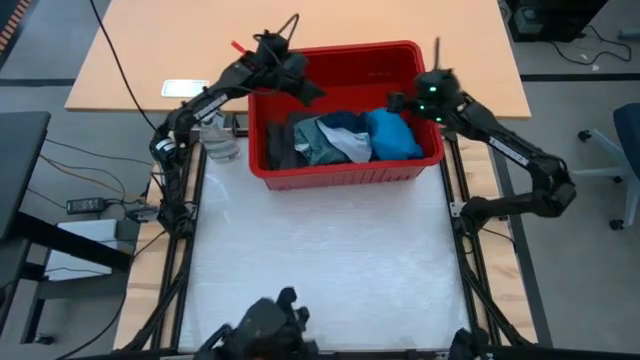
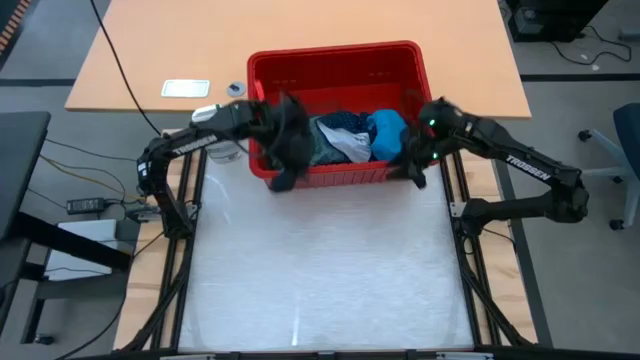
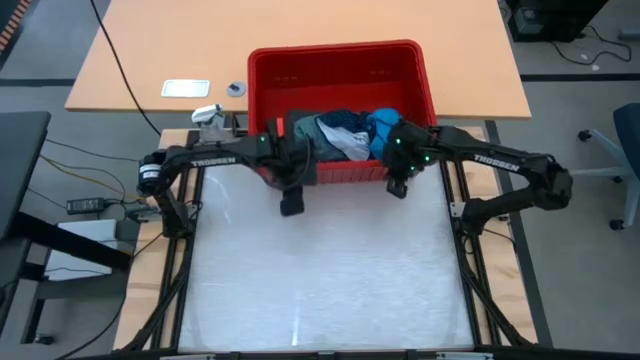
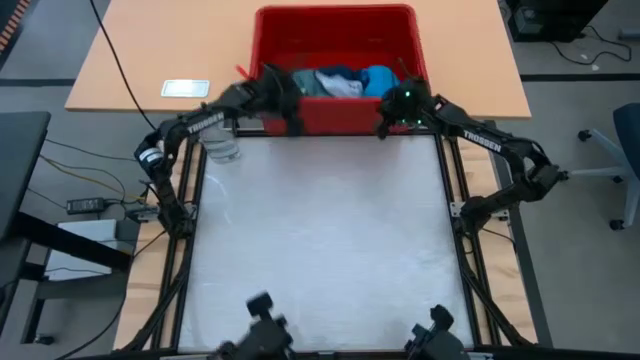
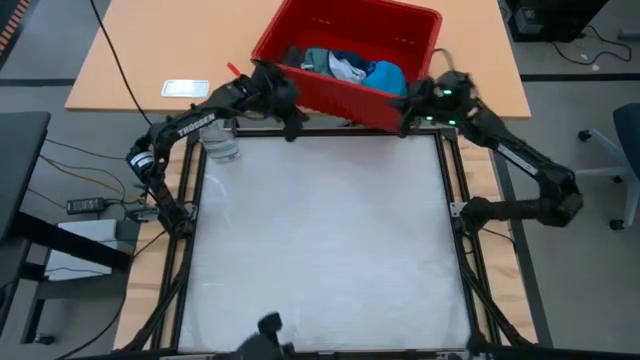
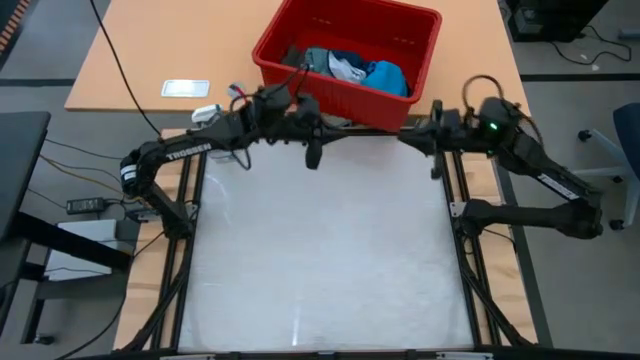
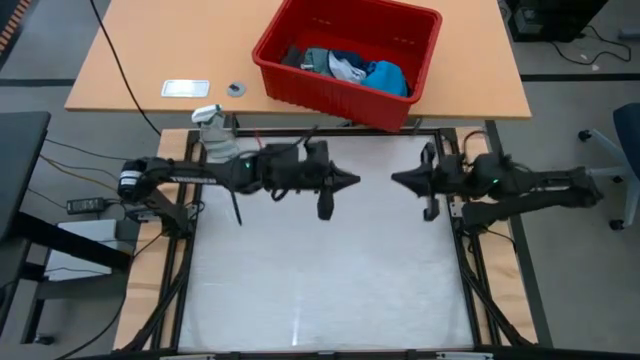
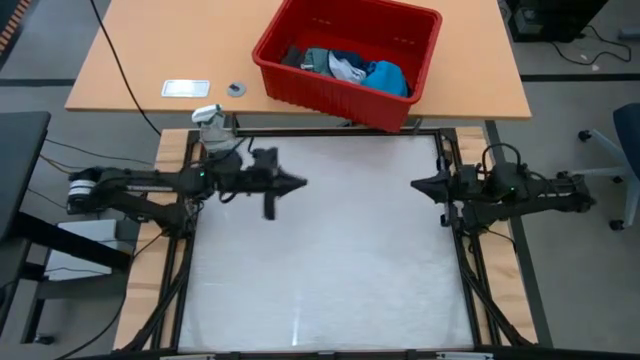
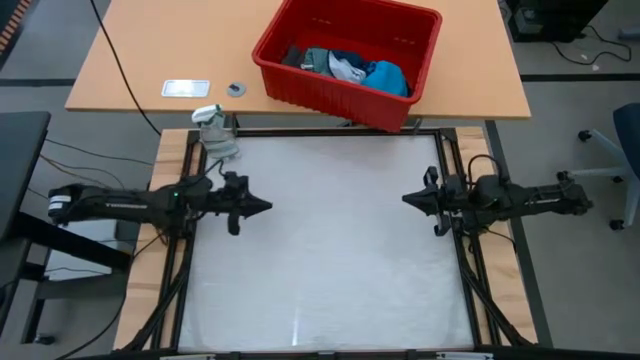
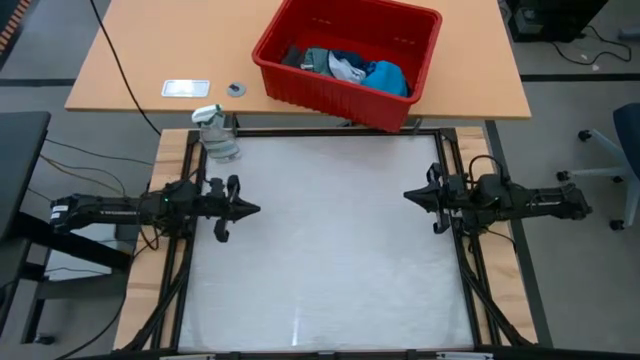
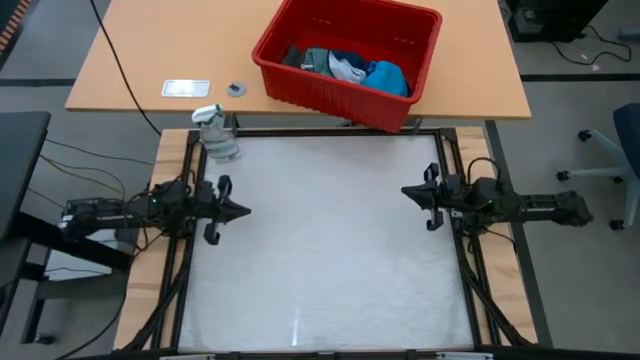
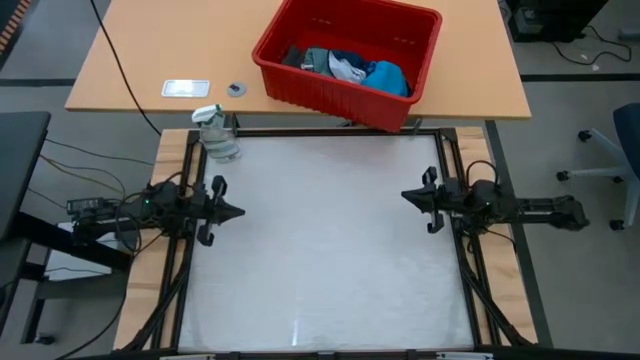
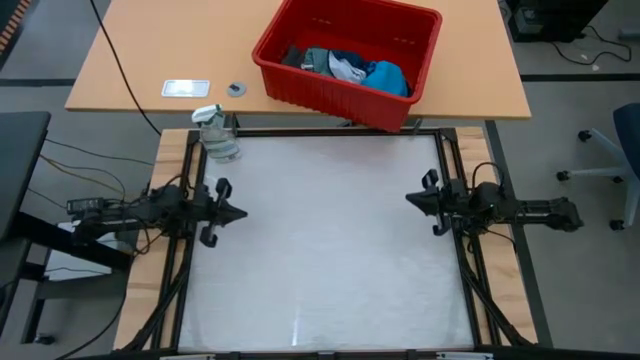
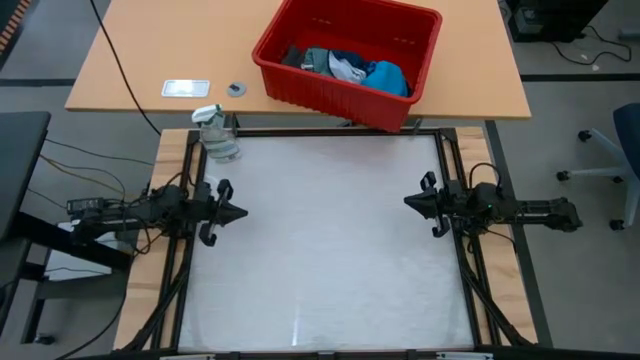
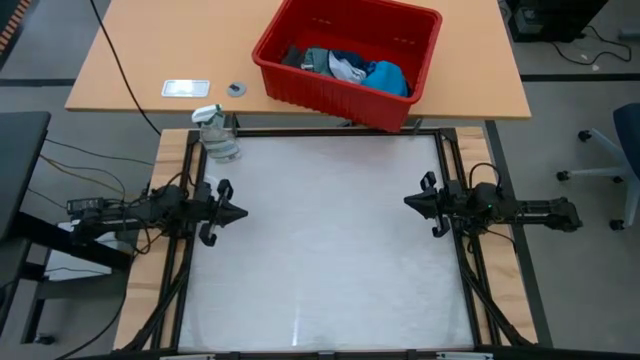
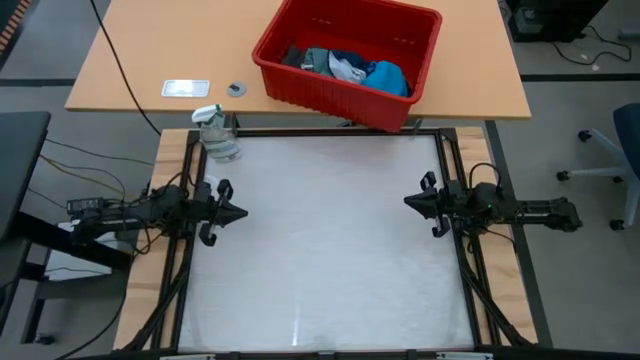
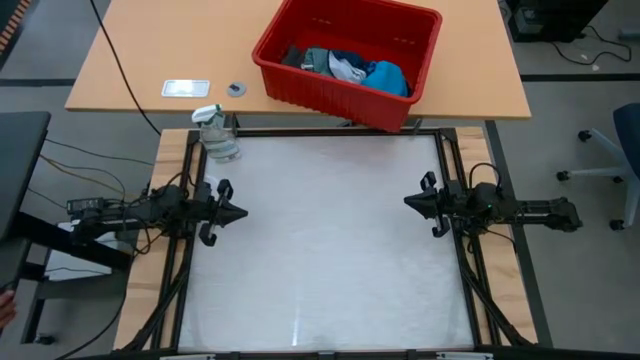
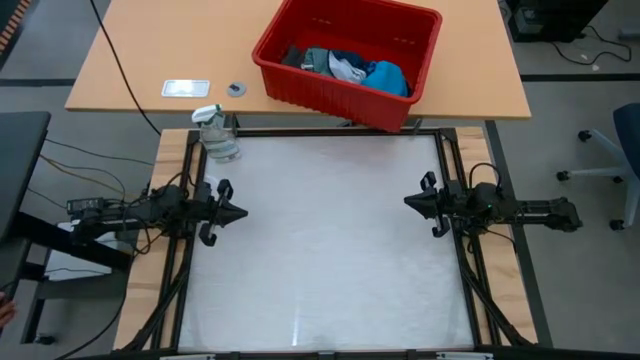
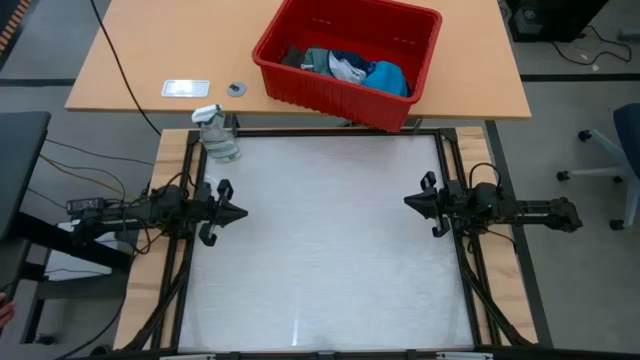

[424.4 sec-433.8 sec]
Task: Fold Laundry from Bin
Return to Home Position

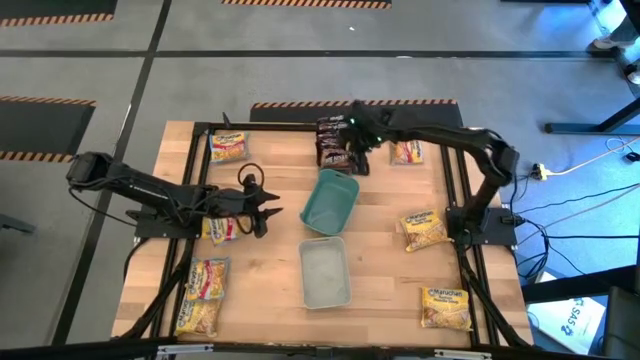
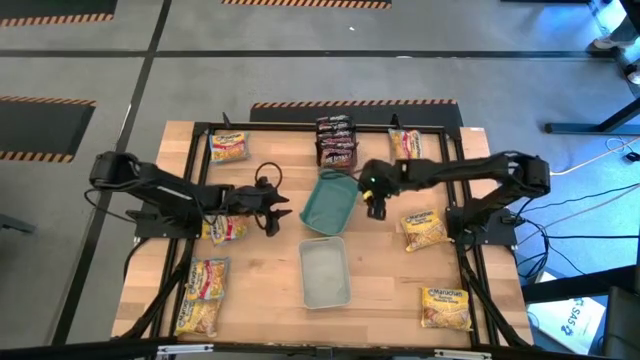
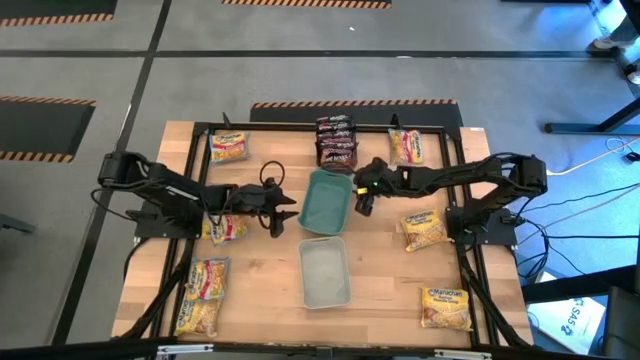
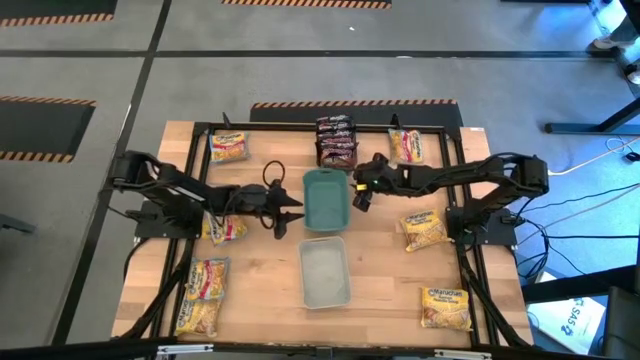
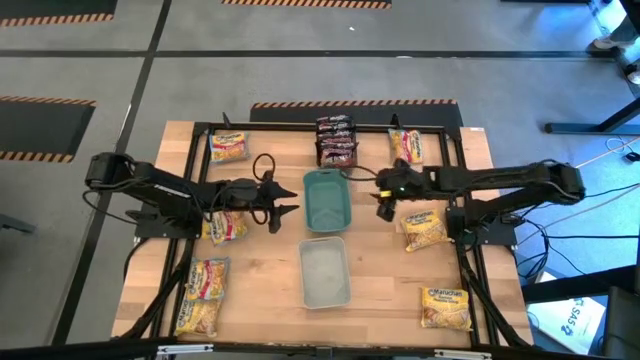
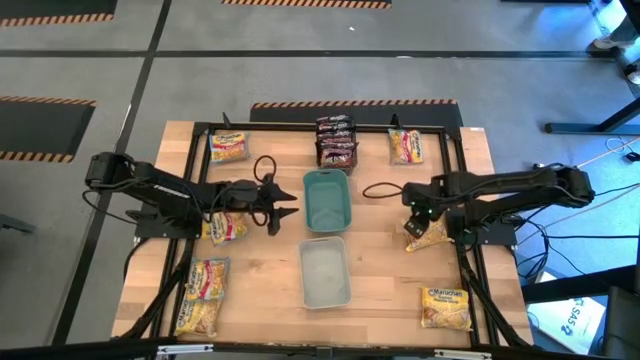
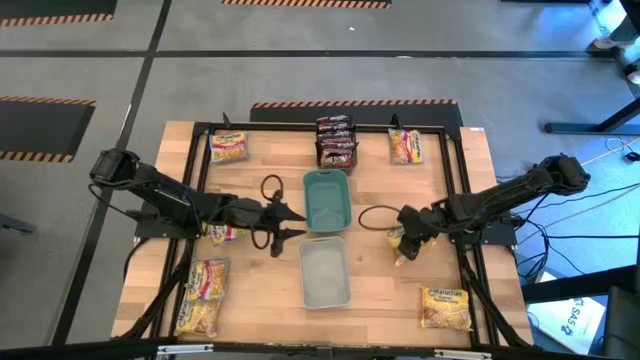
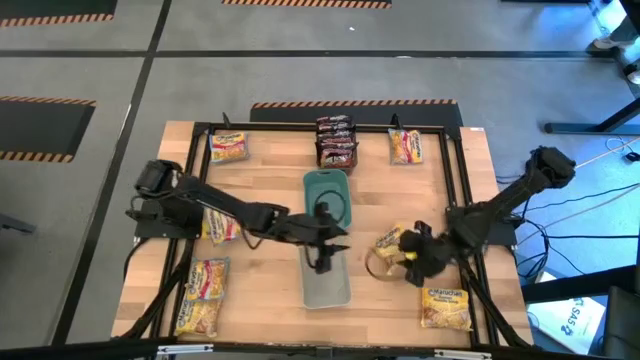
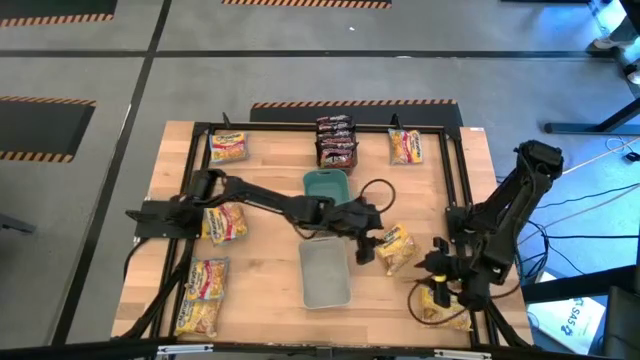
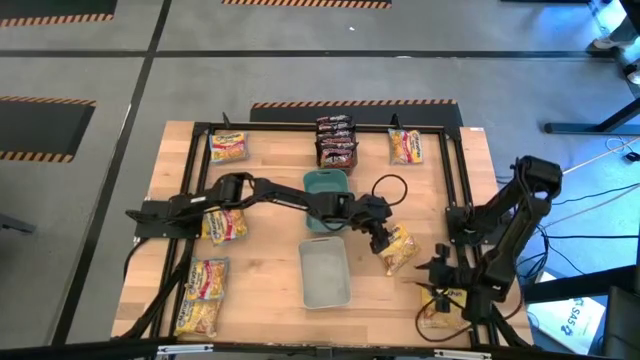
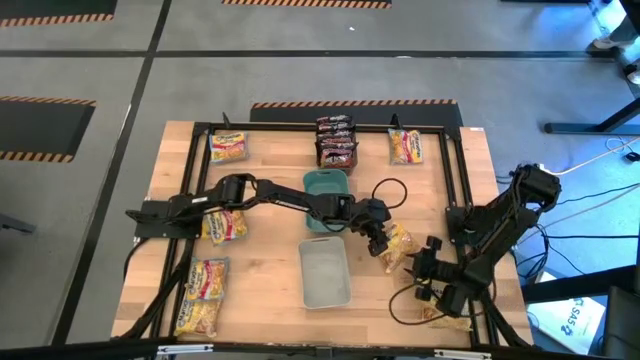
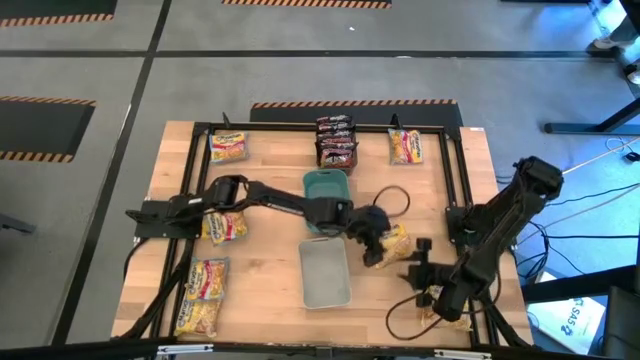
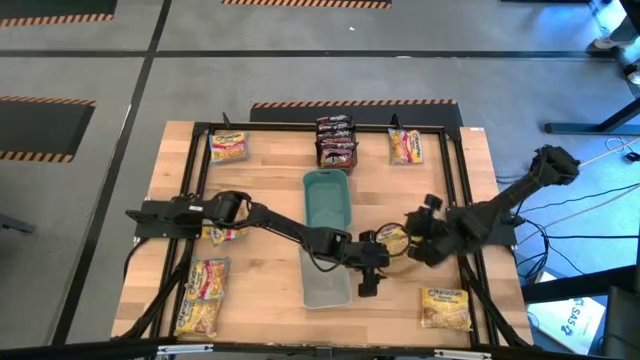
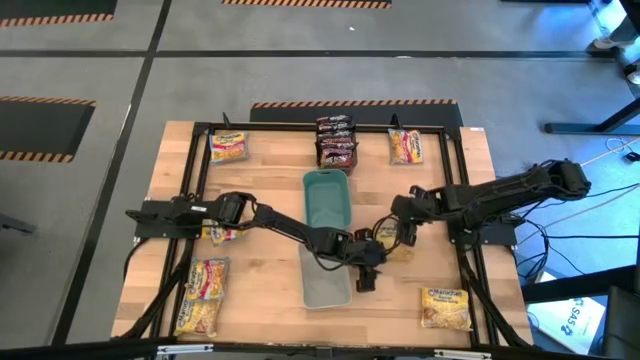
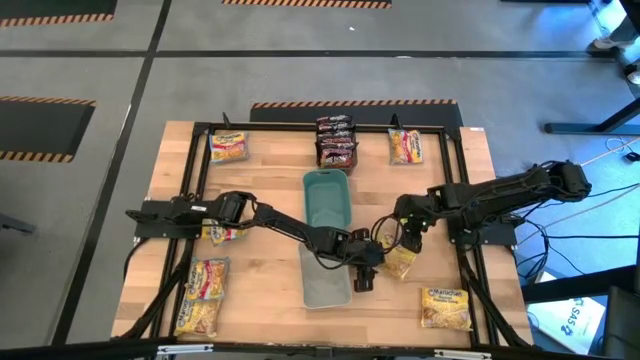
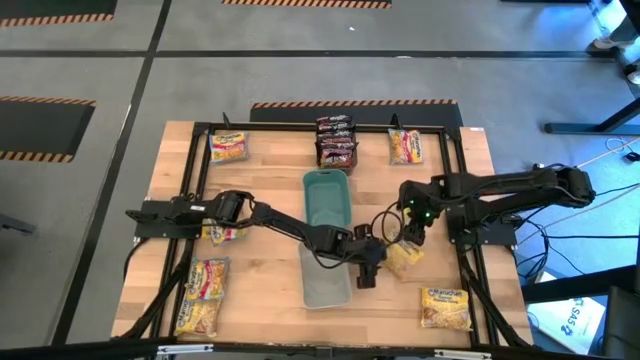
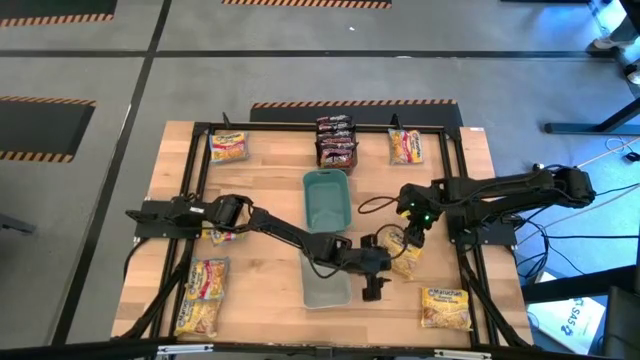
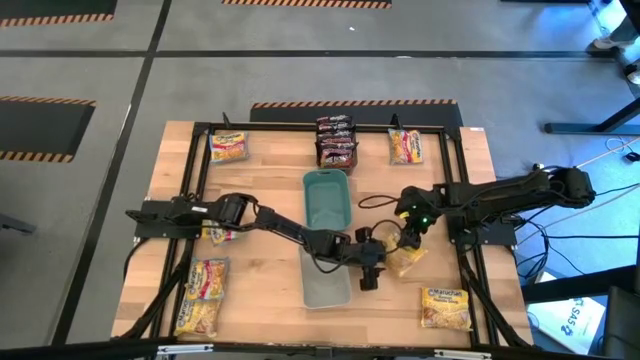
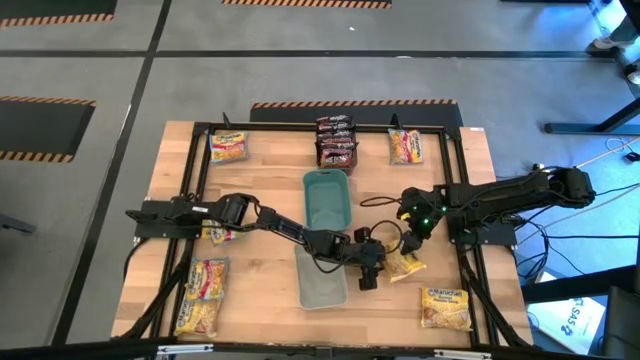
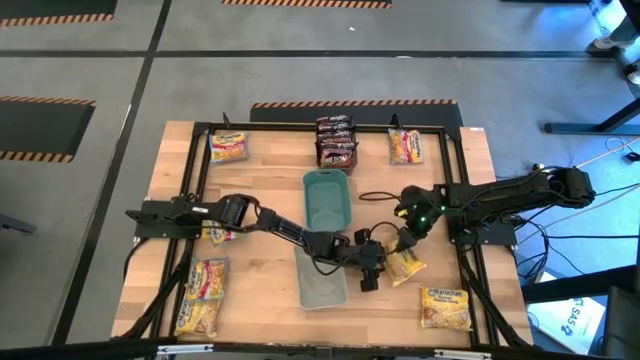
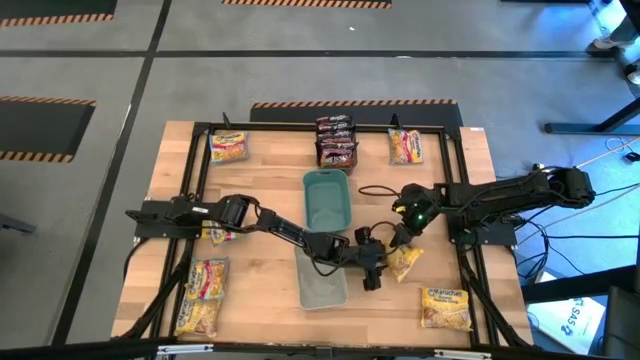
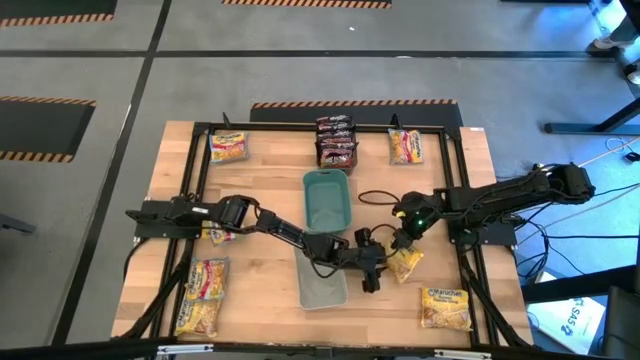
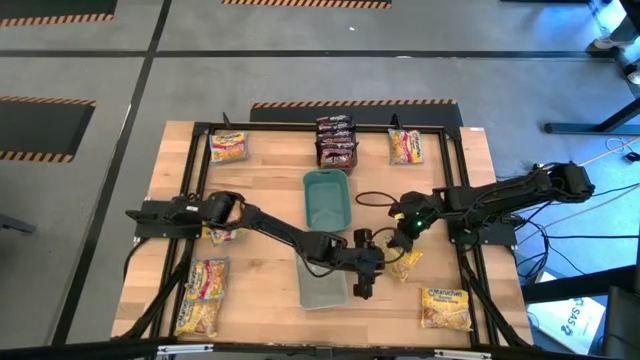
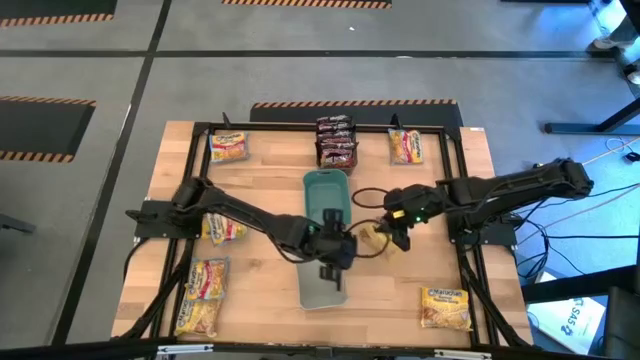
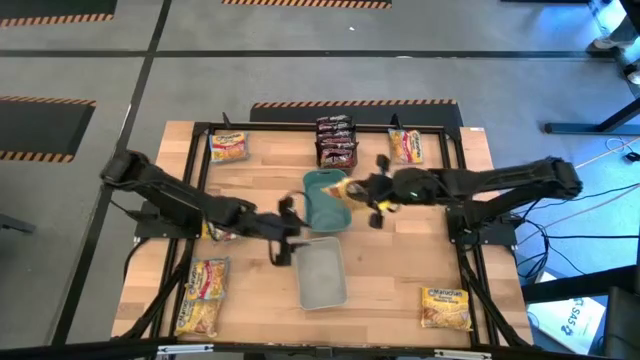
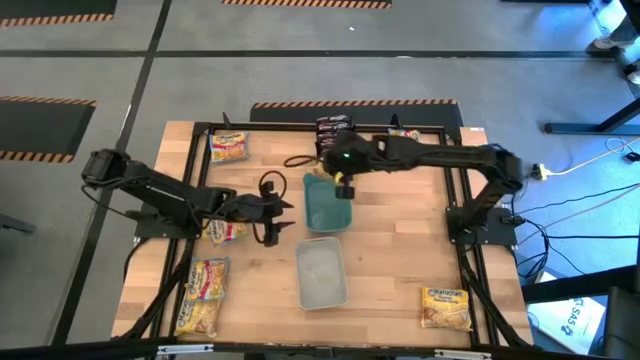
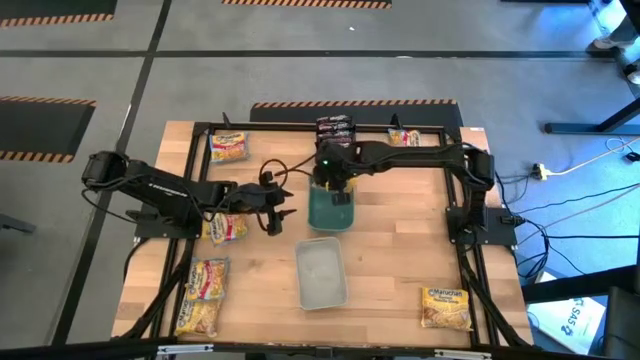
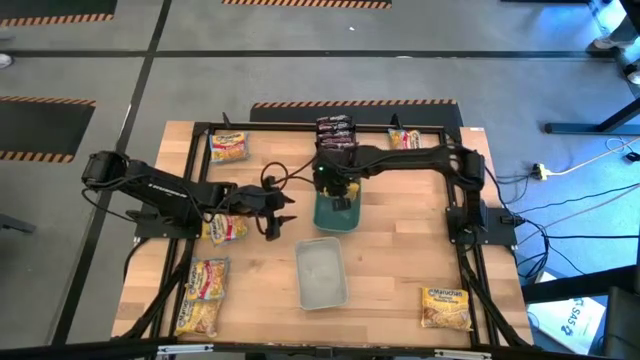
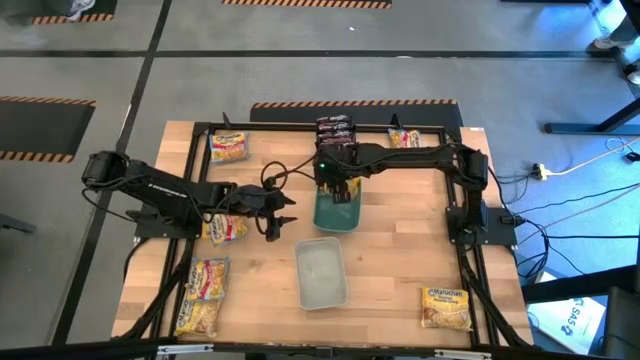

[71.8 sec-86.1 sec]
Task: Sort Maruchan noodles
Put the yellow noodle pack into the green bin
